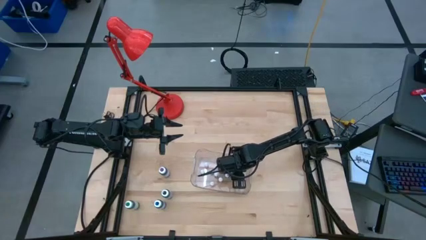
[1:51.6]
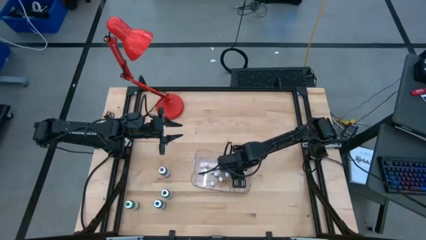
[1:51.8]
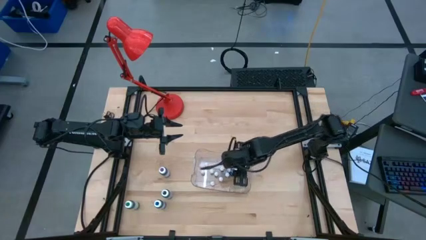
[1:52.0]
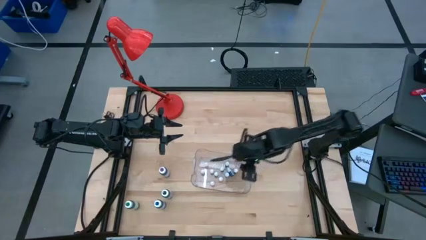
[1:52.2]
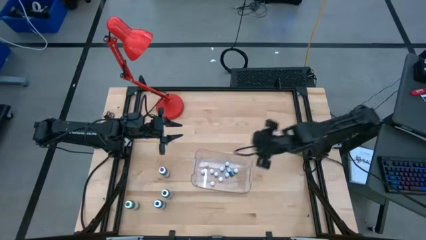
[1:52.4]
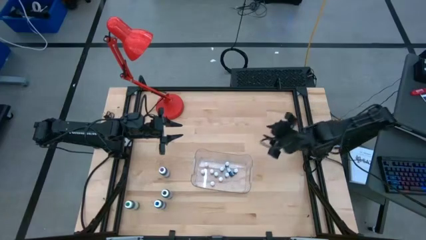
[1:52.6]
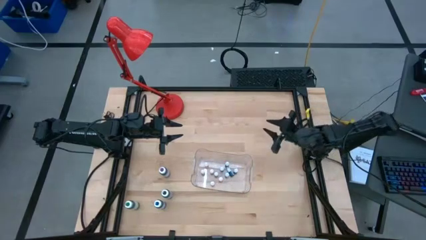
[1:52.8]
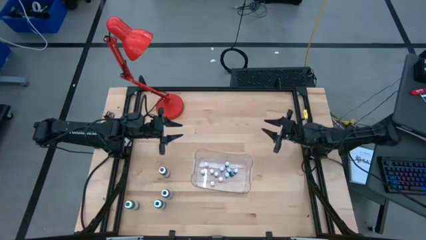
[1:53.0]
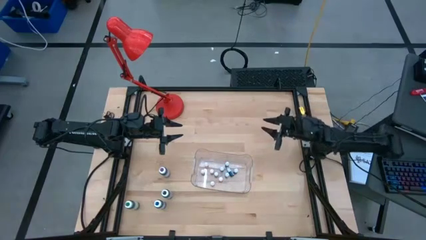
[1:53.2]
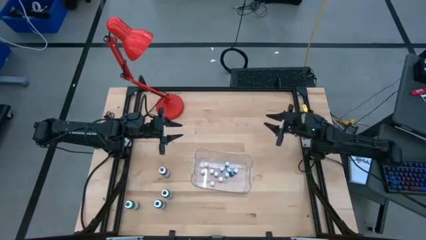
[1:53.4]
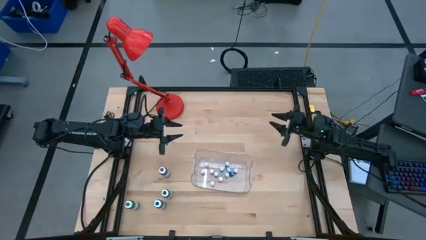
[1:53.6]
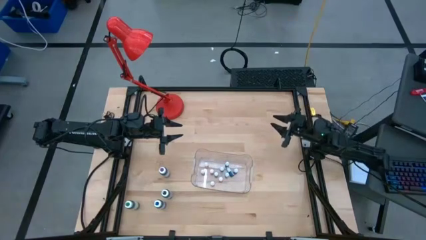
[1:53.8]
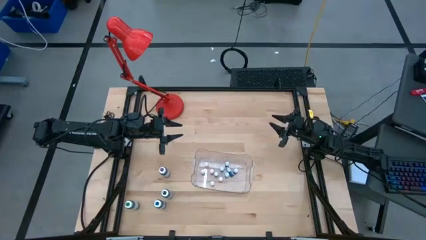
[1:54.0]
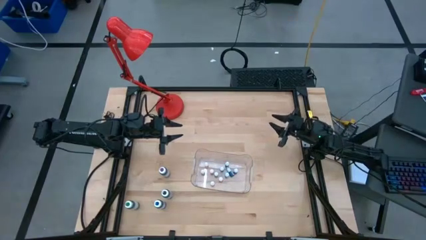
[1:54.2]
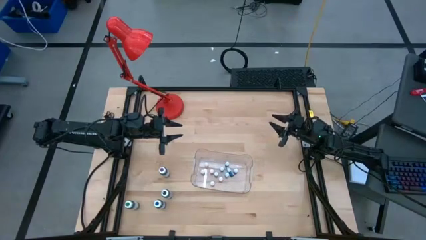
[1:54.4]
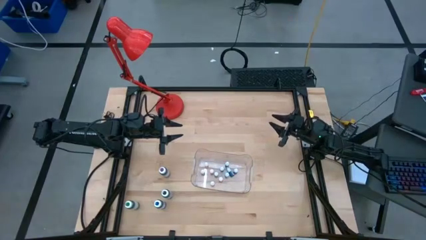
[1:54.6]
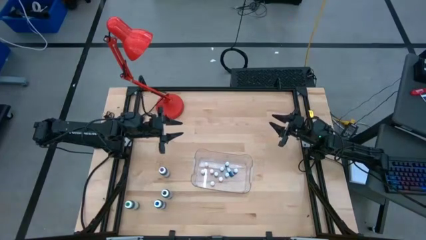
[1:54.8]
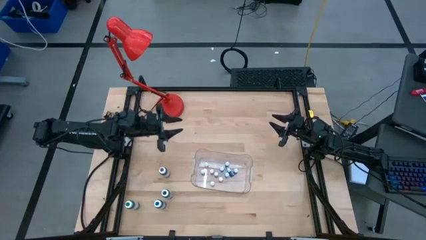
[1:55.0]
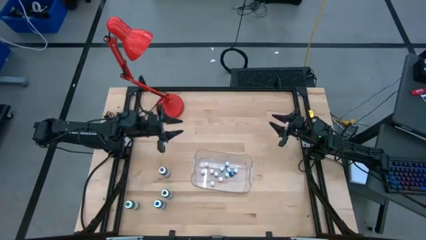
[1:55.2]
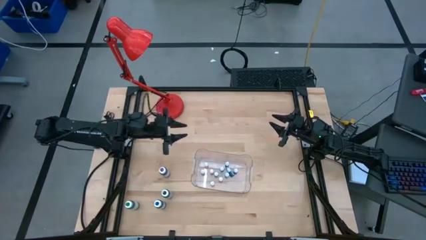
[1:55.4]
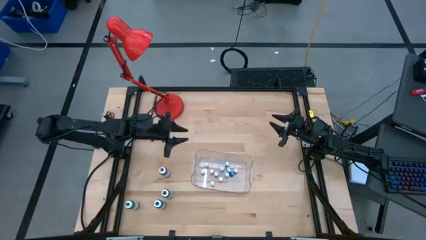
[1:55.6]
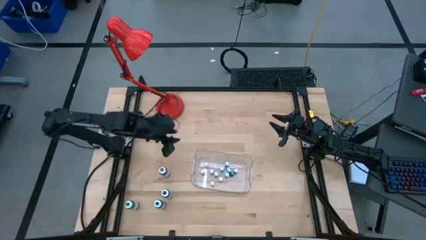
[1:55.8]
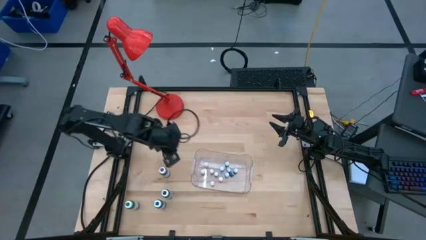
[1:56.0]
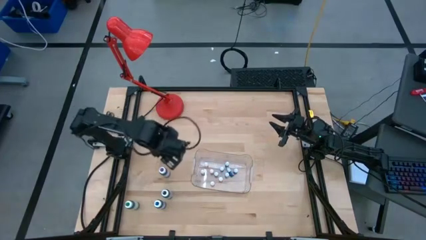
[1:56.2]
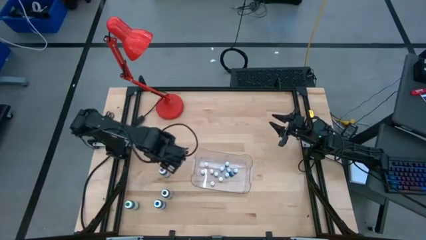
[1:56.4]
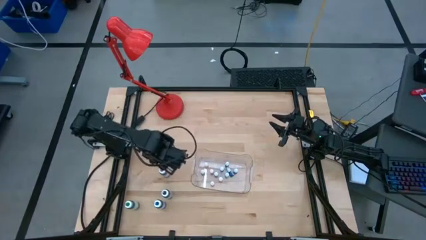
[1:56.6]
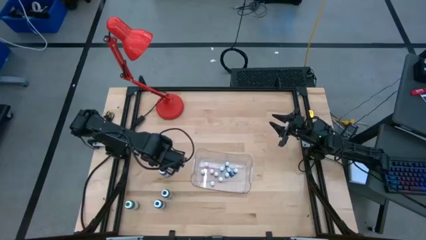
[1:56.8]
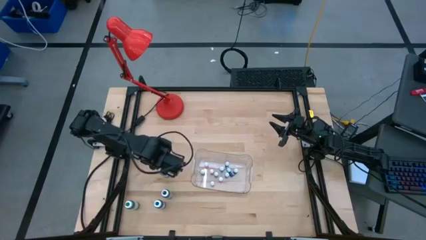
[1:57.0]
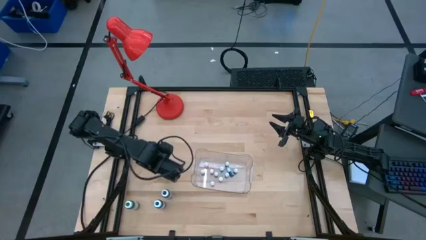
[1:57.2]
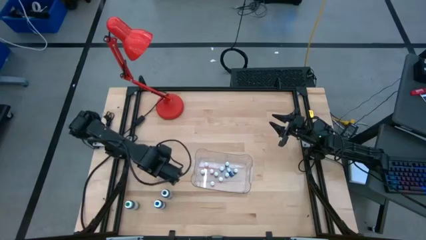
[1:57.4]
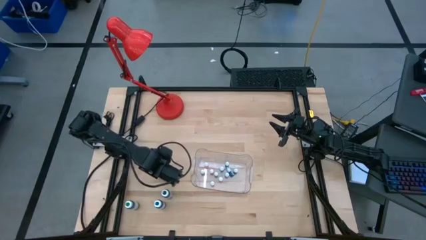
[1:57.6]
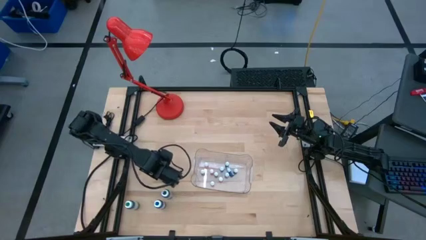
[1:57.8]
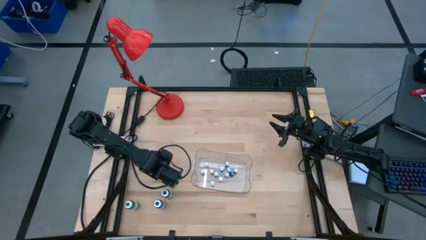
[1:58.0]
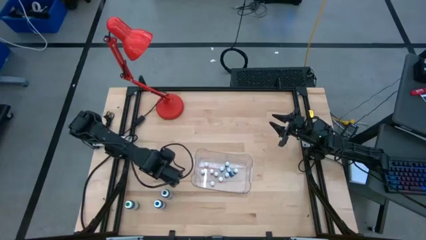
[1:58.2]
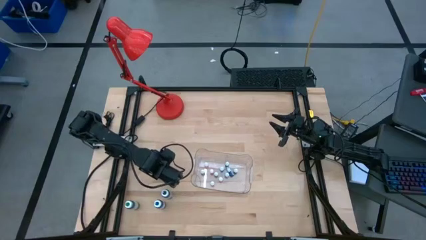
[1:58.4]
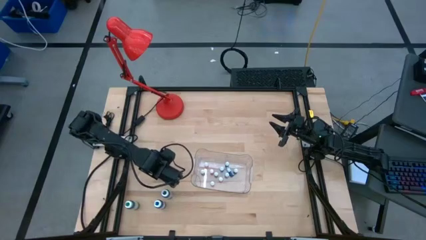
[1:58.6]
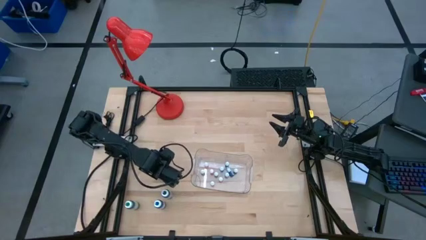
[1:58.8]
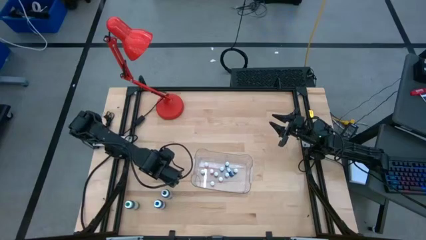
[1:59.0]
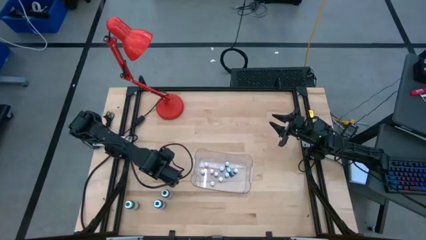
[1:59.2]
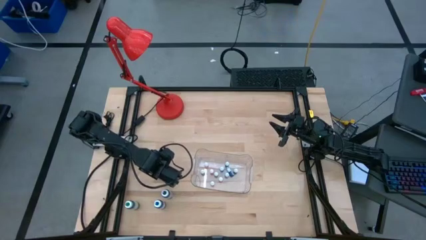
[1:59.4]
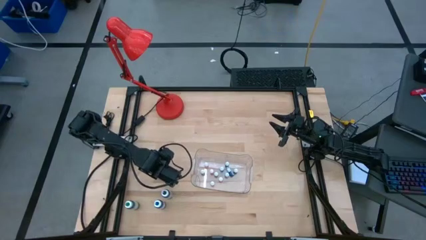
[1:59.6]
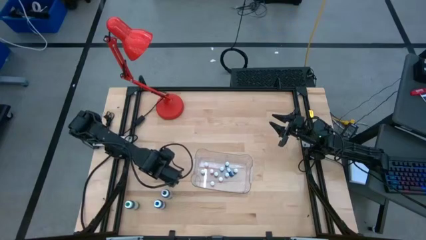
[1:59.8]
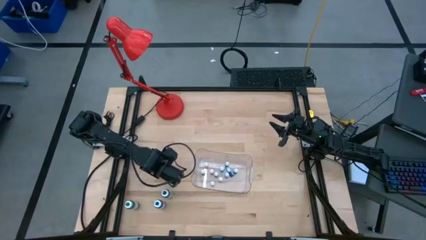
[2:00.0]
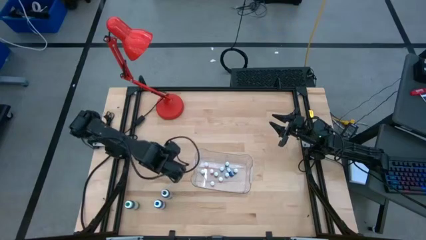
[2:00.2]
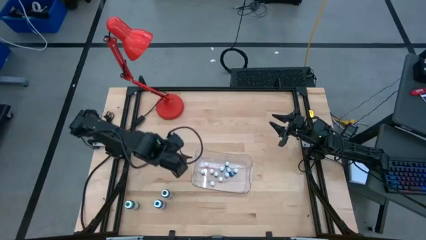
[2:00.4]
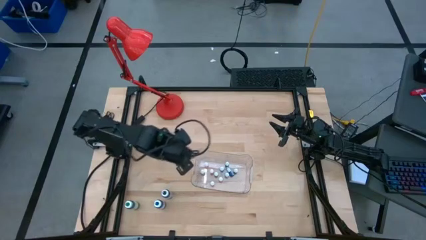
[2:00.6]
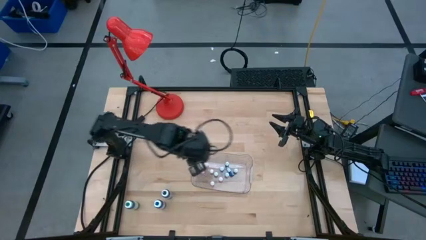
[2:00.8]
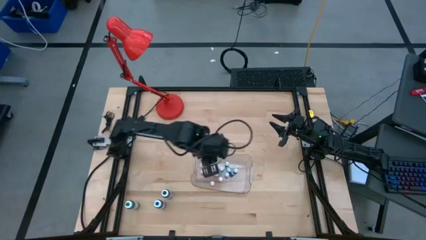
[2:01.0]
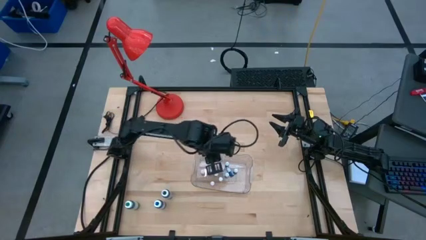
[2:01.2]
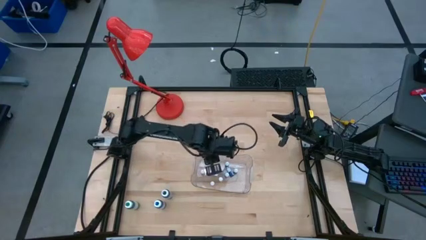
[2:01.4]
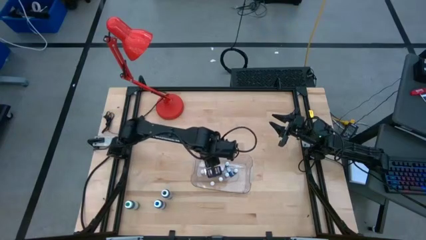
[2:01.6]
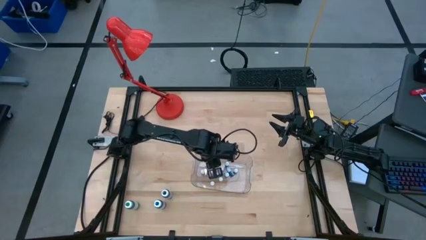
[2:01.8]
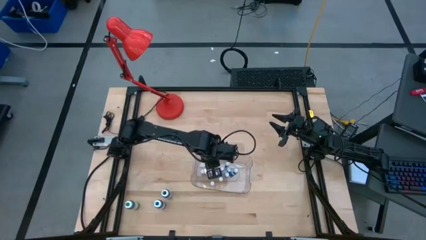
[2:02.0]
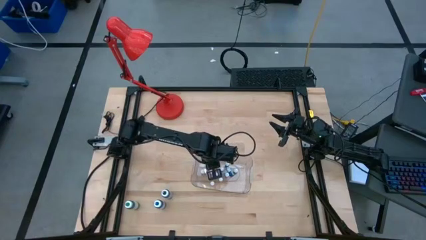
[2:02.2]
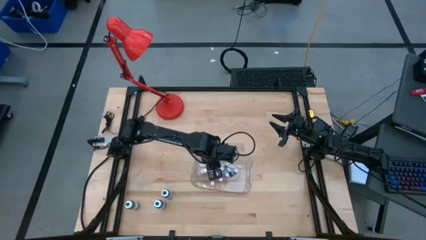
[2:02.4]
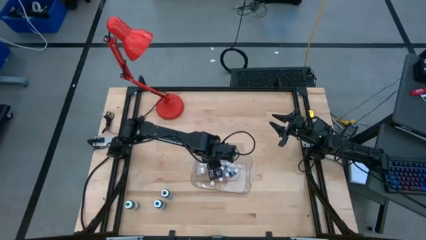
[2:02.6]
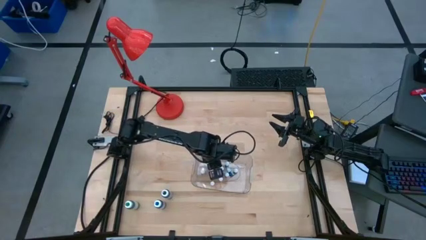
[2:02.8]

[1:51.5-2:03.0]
Task: Pick & Place food coloring
Put the large purple food coloring bottle into the transparent bin

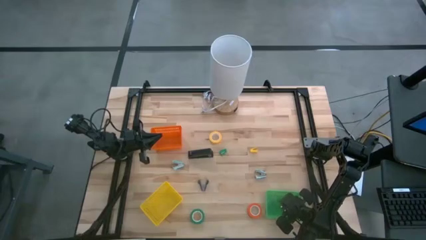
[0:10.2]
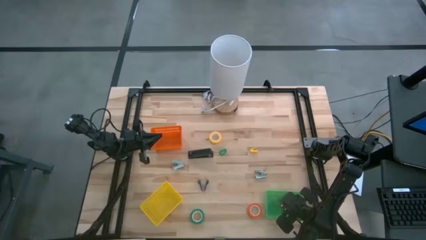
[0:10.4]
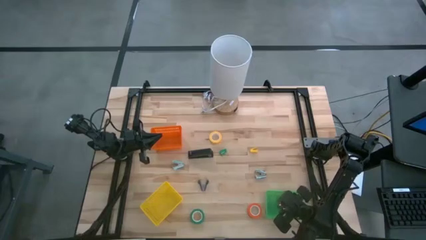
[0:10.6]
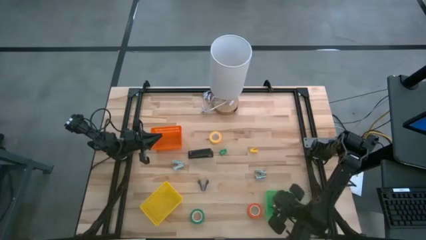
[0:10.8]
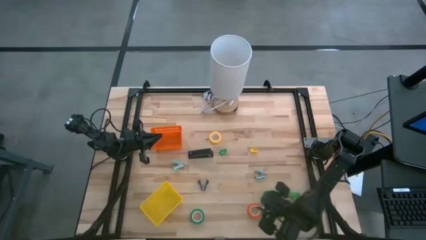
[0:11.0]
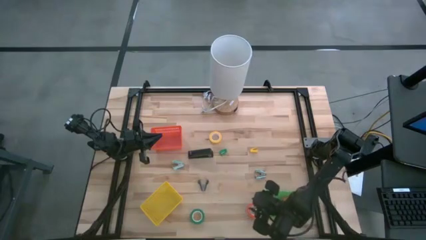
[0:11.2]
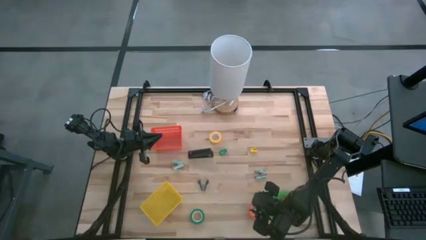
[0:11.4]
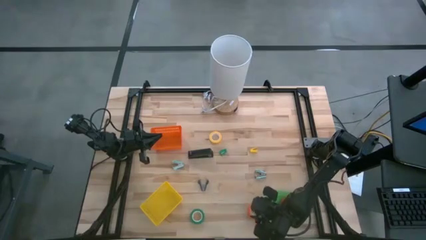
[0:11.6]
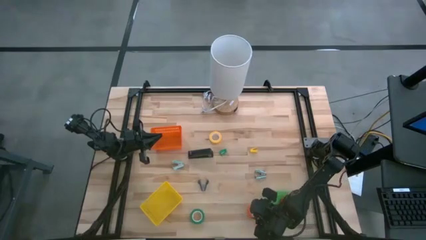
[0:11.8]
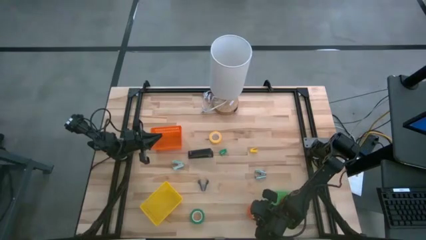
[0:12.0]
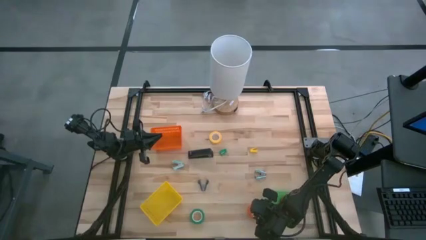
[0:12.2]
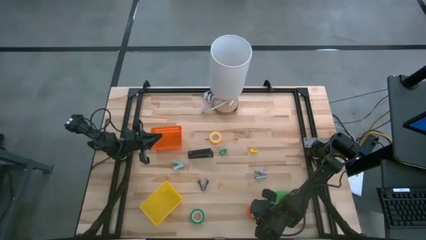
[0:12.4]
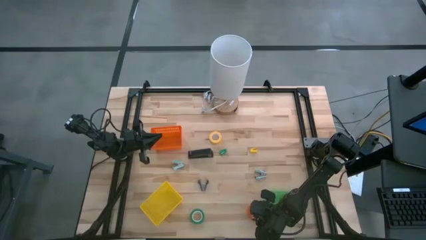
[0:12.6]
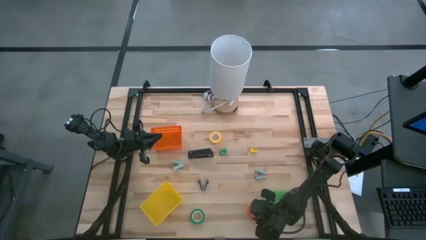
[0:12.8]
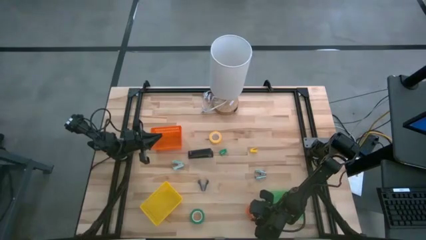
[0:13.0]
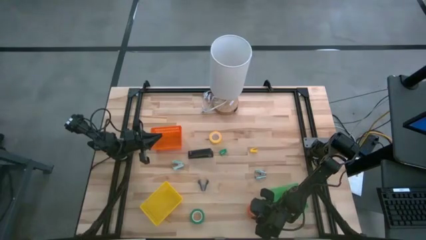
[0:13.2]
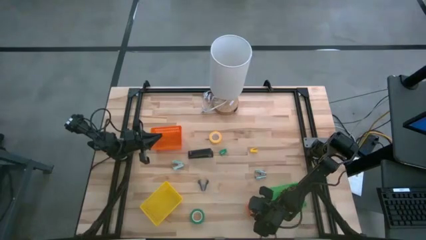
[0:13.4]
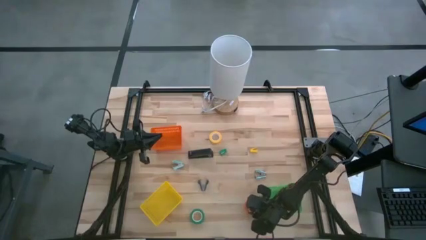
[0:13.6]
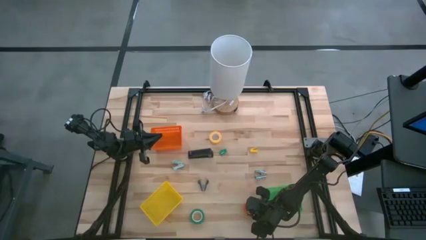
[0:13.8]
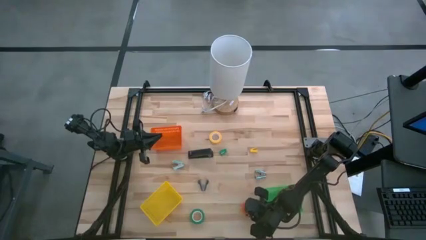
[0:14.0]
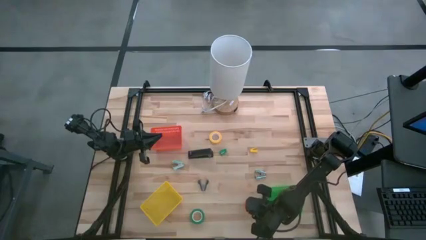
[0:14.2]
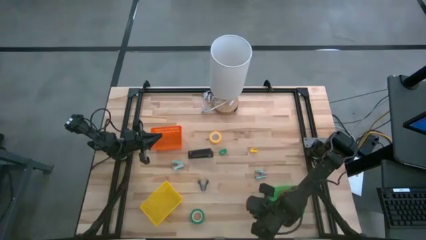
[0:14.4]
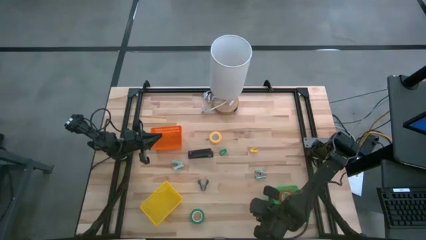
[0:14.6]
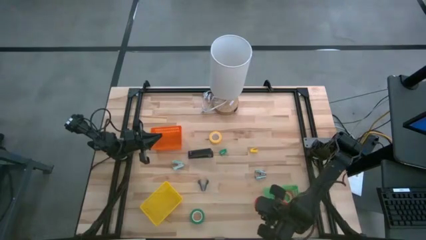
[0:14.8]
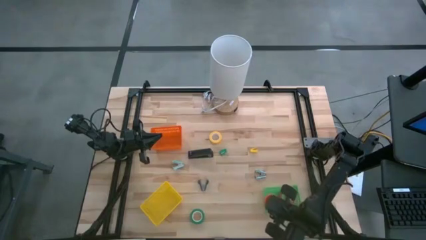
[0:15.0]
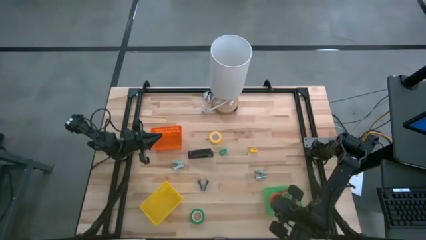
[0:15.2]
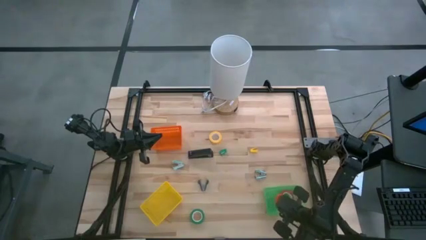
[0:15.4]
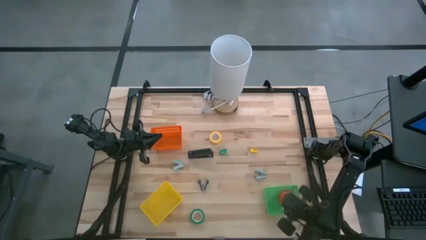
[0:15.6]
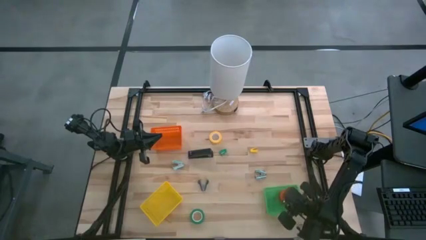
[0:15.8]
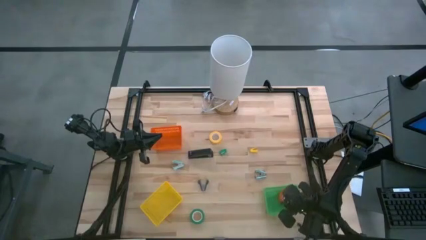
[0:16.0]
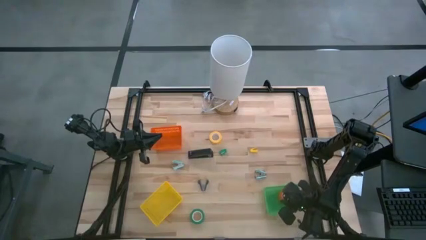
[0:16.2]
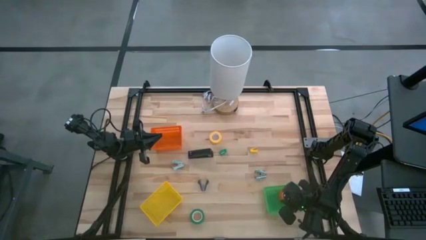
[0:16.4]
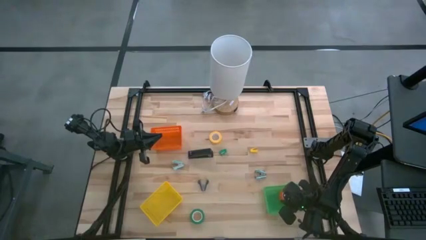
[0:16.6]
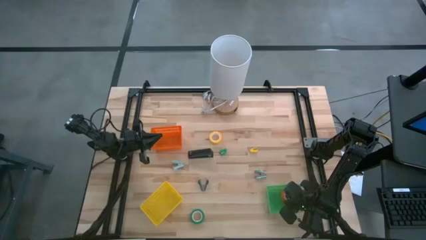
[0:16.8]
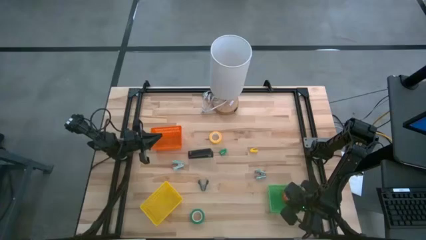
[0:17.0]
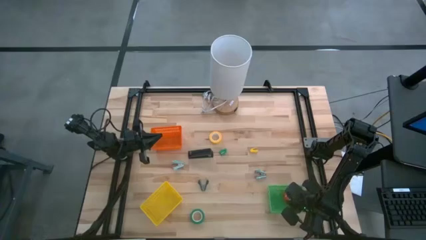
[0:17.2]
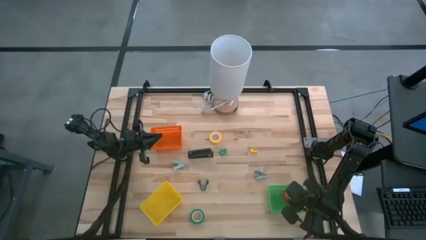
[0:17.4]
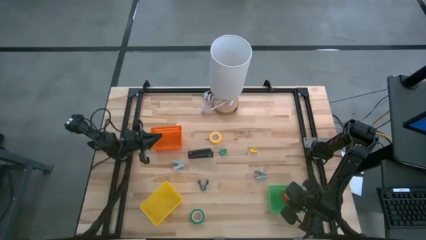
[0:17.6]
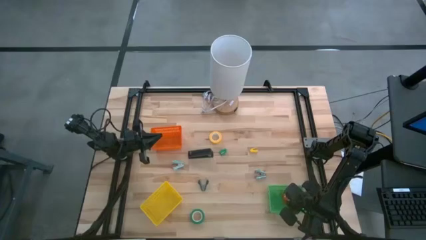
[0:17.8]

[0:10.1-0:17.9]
Task: Pick and place Stapler, Stapler remover, tape
Put the orange tape into the green bin
